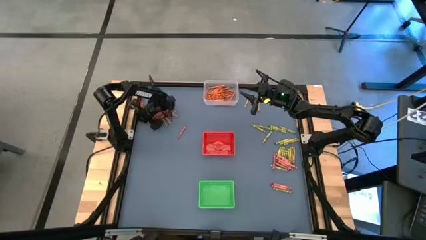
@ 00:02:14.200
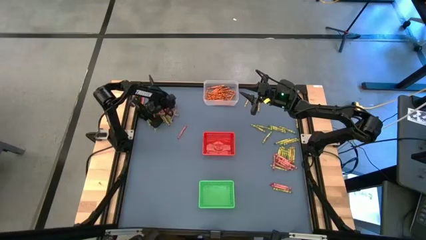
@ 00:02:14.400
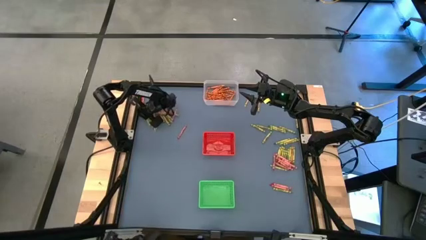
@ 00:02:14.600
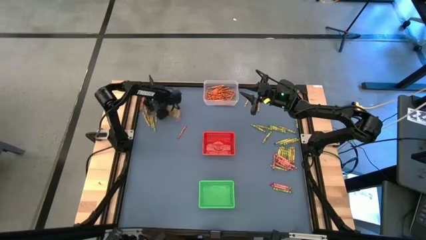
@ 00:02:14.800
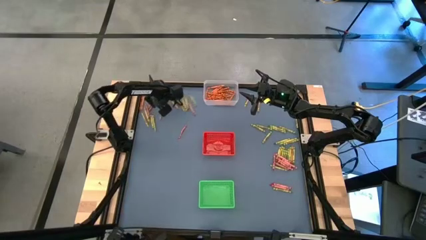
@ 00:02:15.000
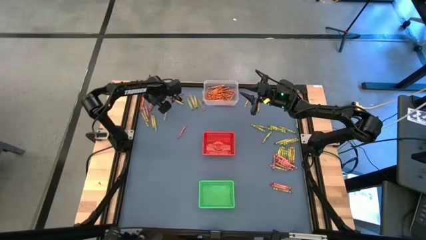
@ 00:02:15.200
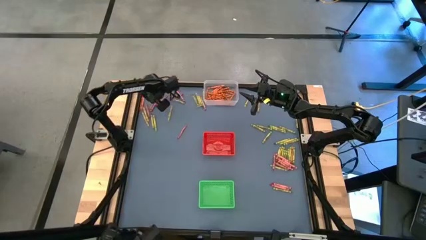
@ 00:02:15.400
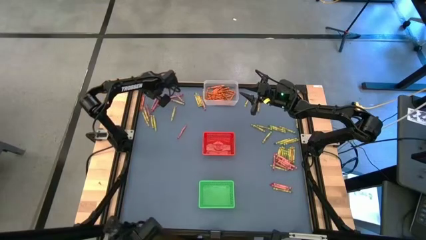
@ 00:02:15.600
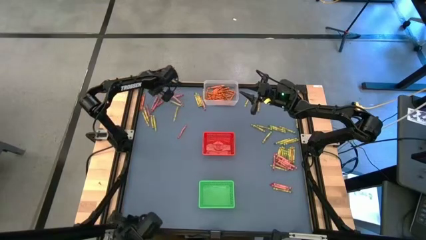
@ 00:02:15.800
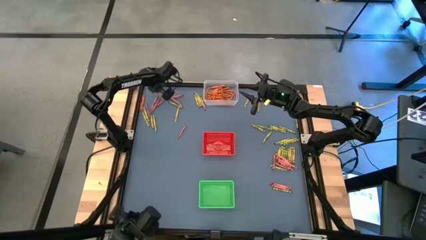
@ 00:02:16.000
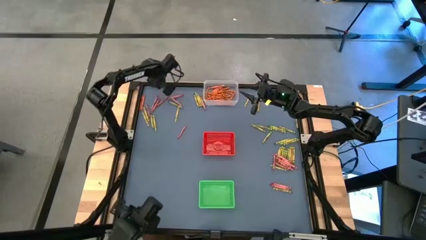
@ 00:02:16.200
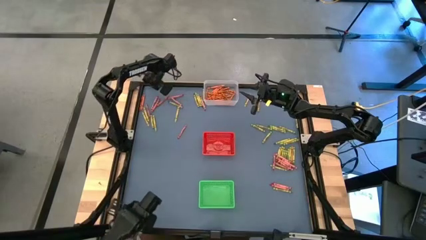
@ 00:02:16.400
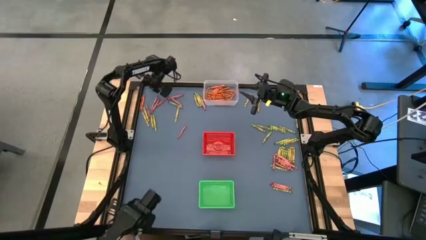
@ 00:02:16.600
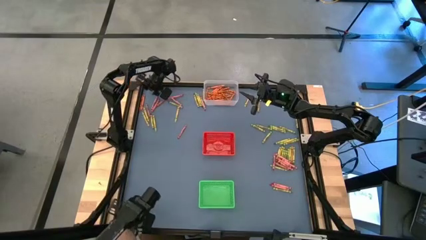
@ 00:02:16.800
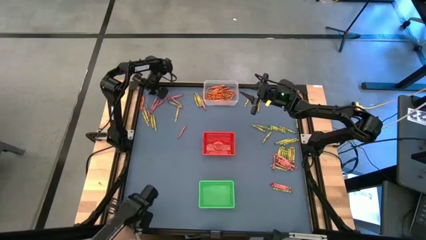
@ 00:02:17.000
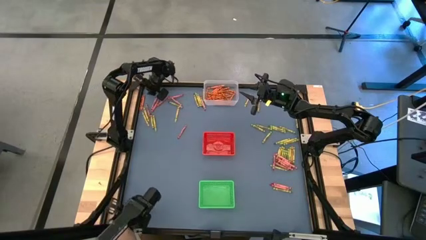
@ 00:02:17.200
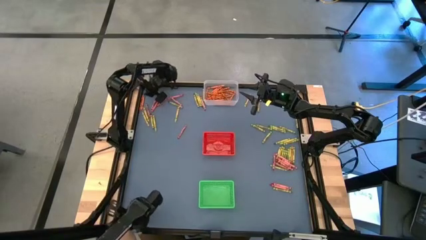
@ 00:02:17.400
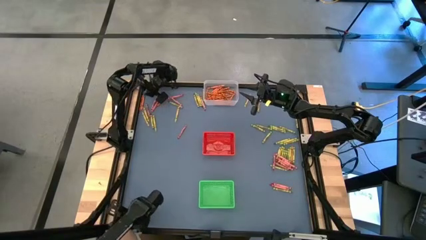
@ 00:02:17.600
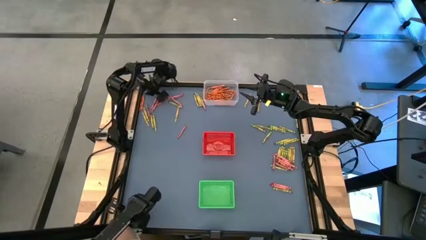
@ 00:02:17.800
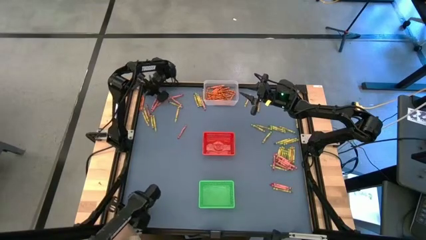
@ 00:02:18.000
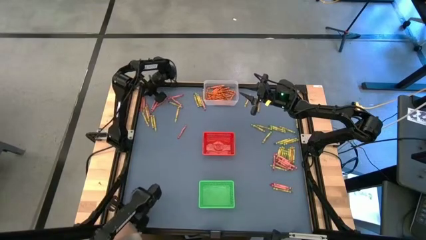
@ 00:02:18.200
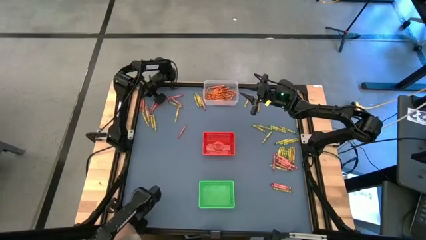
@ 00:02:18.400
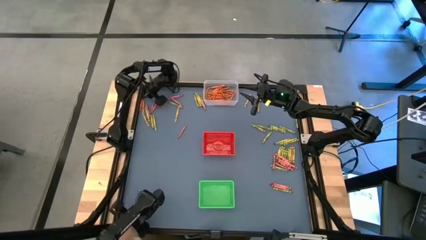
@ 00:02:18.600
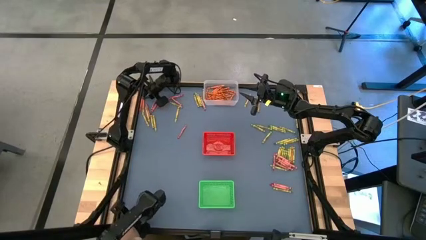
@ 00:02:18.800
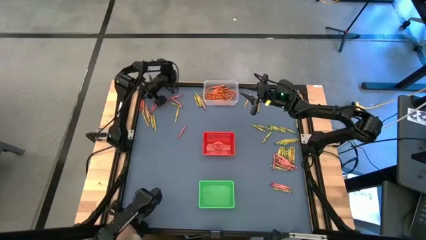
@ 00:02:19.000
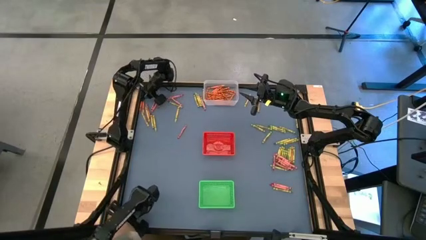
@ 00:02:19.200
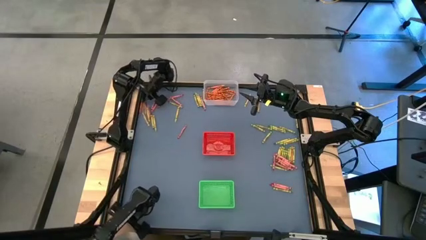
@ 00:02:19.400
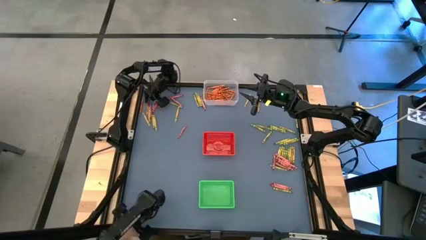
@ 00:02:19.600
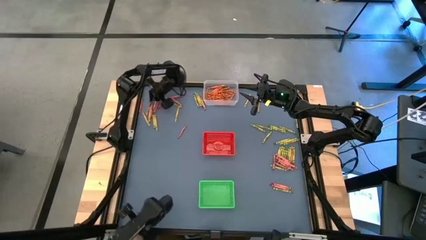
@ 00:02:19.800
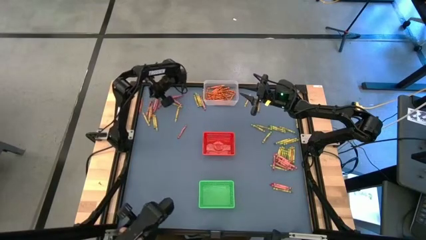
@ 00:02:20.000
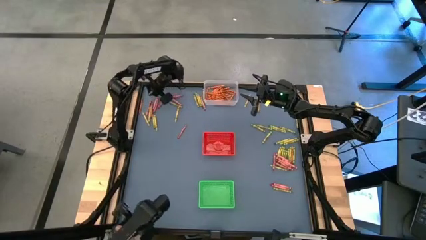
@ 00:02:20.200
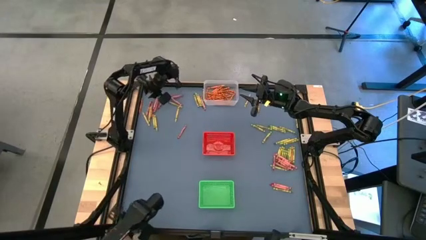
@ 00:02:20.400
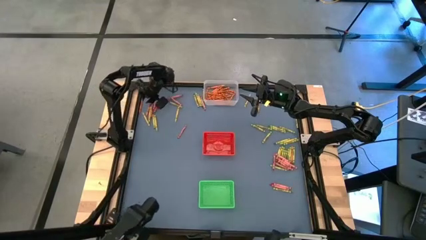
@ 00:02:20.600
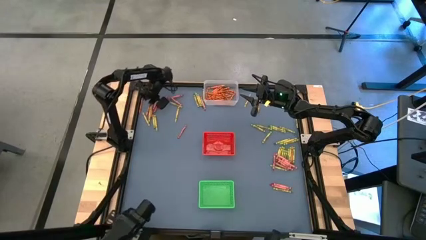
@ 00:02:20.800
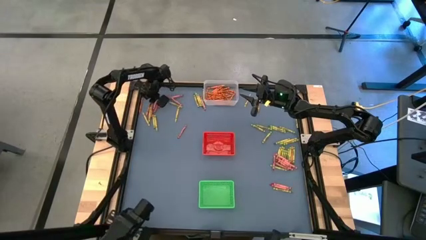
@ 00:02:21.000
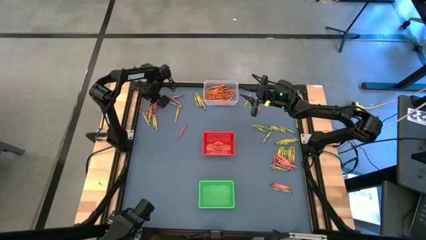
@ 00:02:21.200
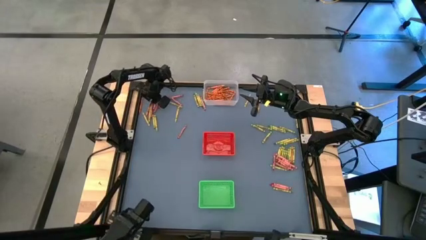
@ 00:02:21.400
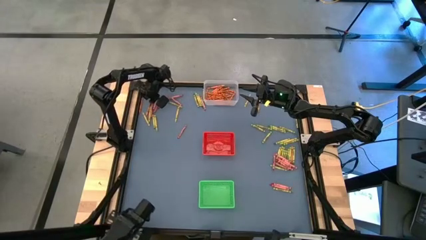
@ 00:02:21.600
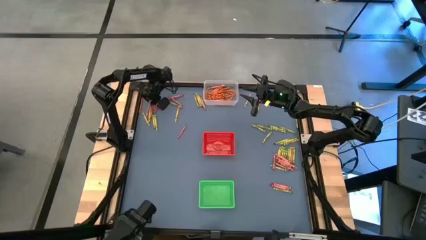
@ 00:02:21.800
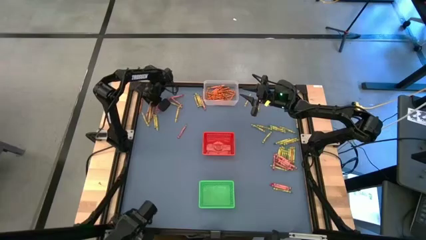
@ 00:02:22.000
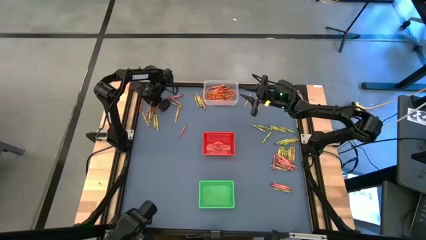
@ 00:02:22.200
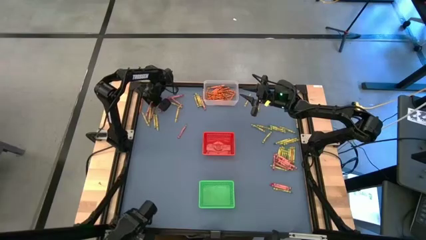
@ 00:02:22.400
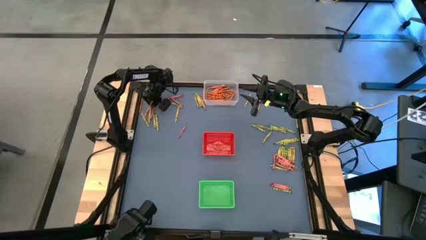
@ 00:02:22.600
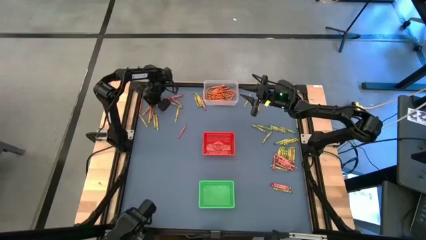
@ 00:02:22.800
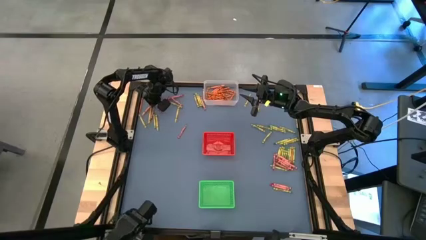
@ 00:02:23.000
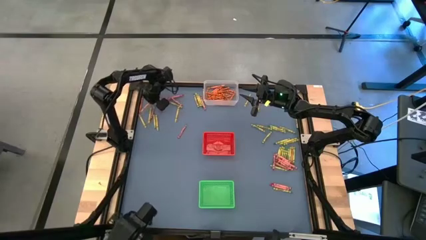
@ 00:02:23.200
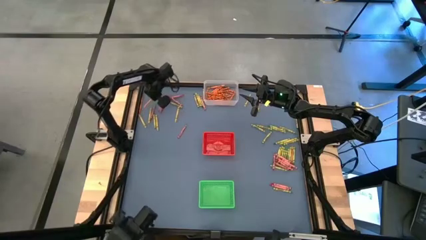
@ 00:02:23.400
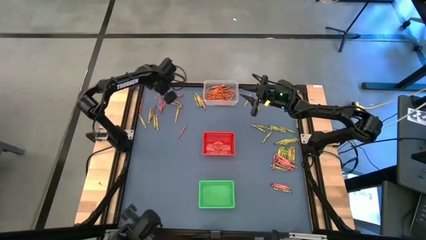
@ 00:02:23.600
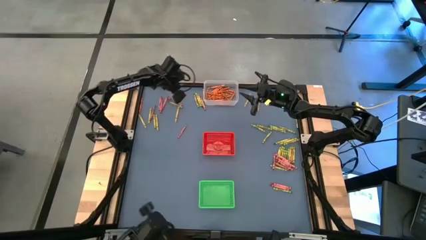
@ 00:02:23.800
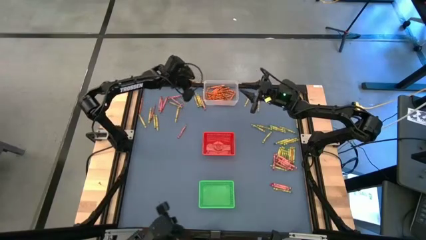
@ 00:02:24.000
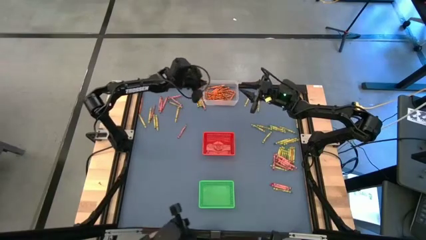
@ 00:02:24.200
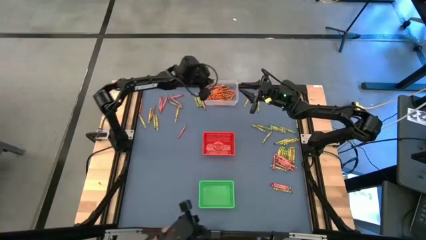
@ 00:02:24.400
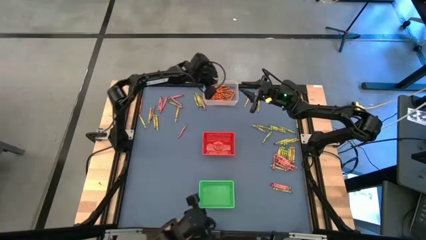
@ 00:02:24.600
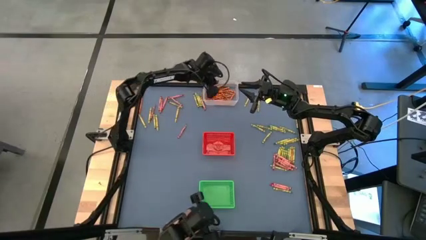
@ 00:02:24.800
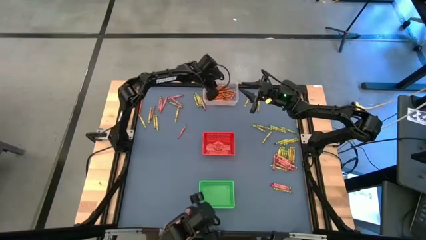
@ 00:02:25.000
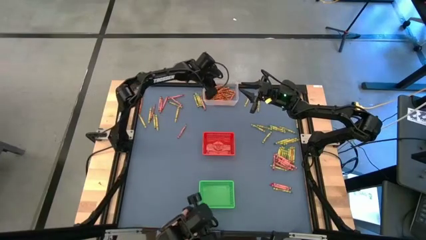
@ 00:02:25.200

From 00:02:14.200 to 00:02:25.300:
Task: Sort crayons
Put the orange crayon into the transparent bin
